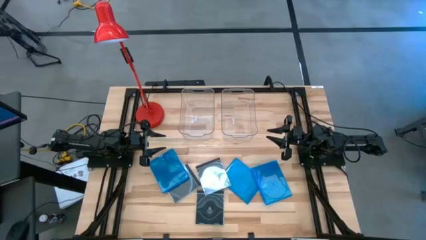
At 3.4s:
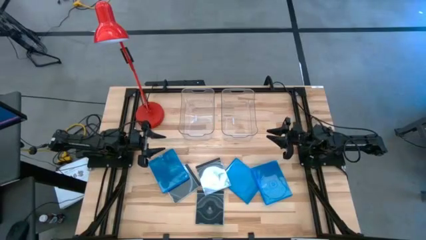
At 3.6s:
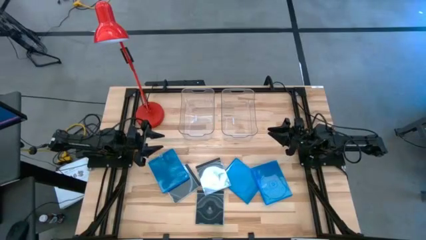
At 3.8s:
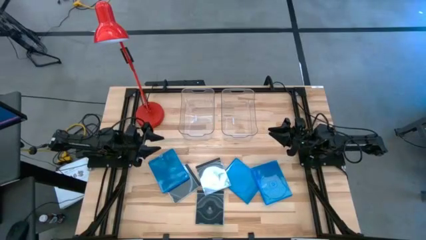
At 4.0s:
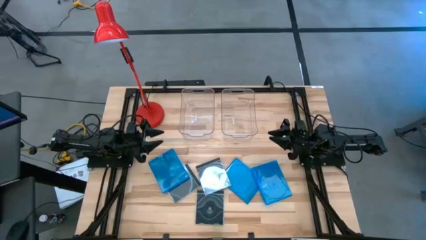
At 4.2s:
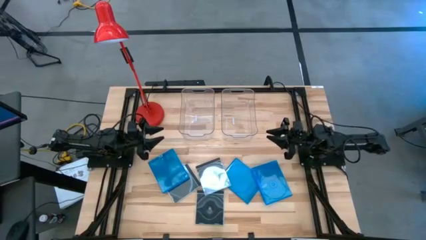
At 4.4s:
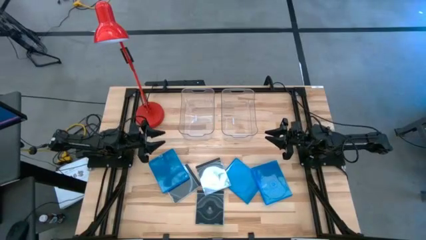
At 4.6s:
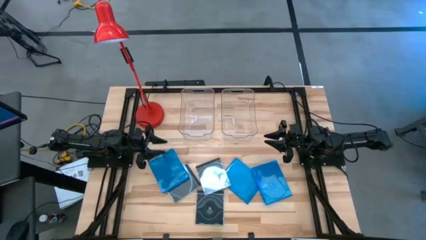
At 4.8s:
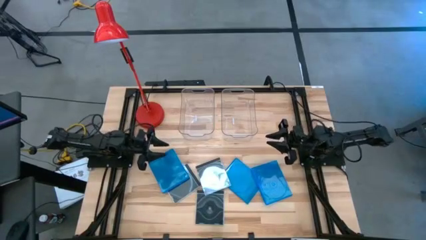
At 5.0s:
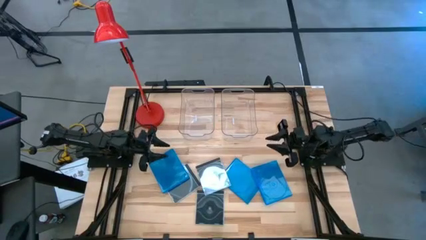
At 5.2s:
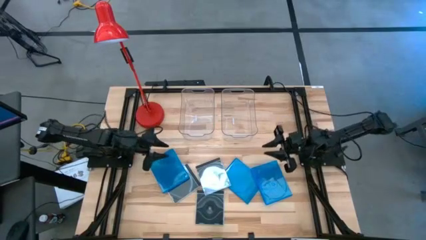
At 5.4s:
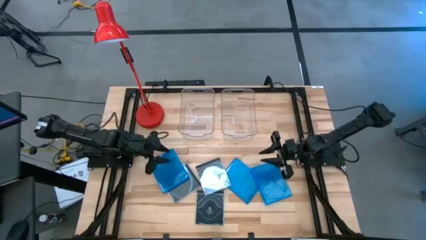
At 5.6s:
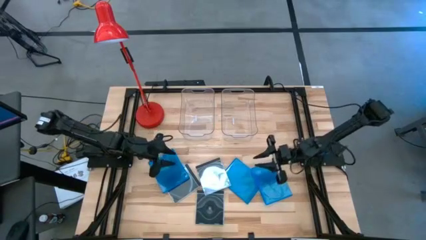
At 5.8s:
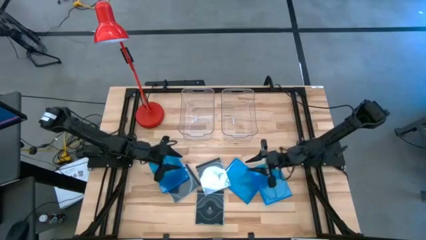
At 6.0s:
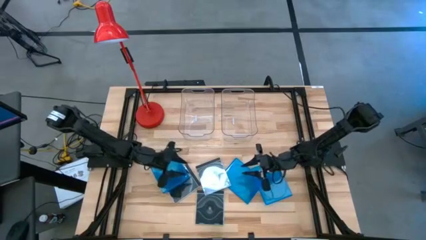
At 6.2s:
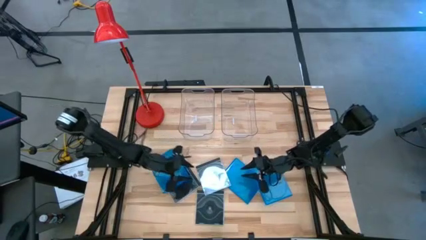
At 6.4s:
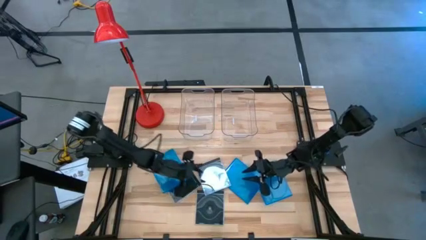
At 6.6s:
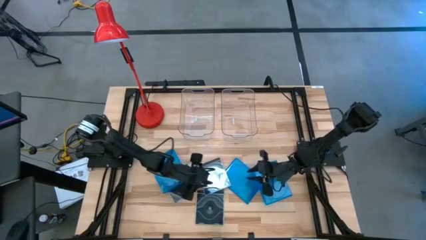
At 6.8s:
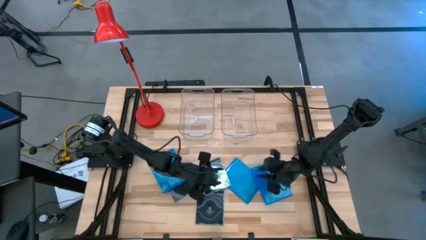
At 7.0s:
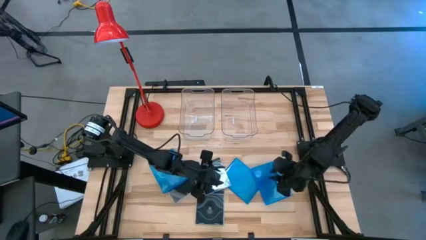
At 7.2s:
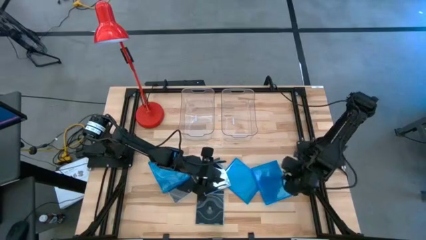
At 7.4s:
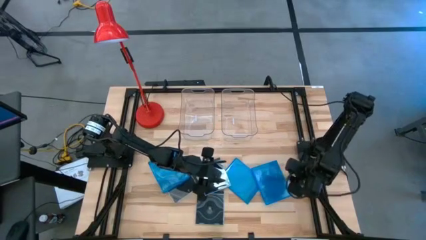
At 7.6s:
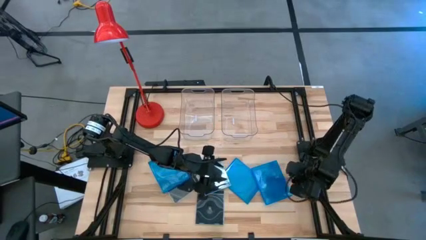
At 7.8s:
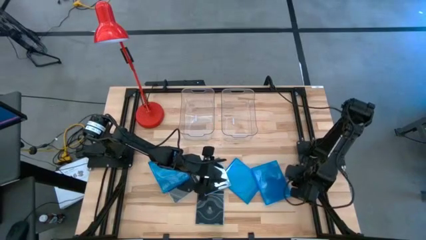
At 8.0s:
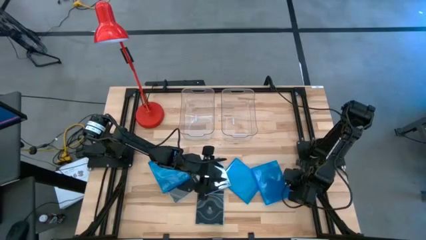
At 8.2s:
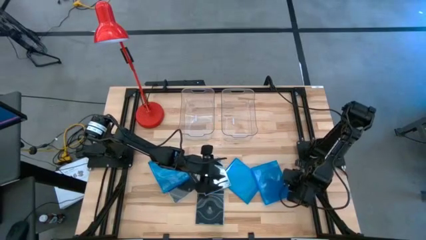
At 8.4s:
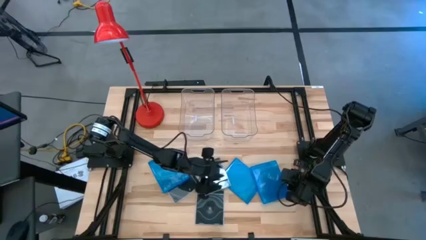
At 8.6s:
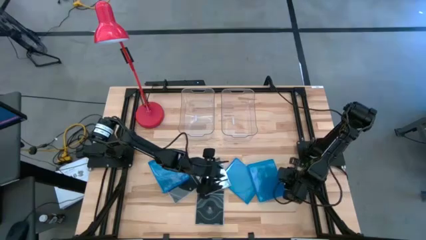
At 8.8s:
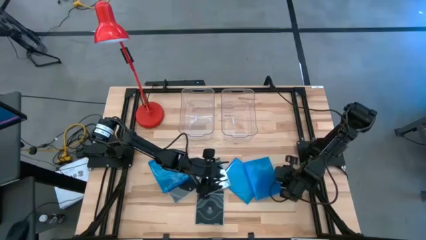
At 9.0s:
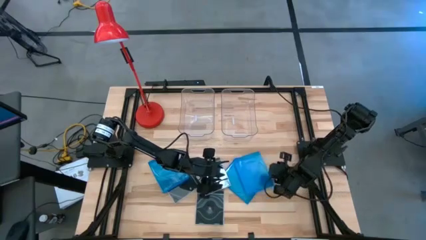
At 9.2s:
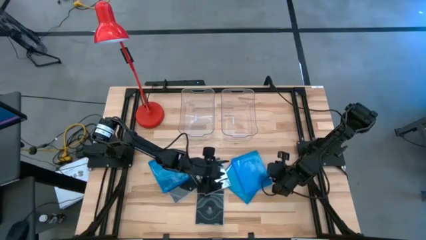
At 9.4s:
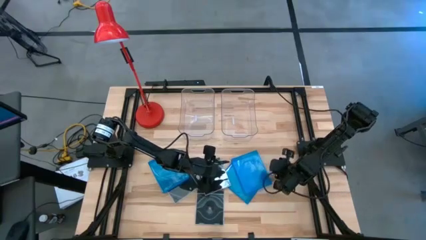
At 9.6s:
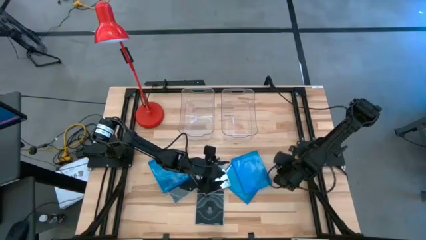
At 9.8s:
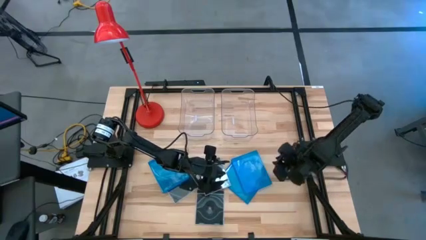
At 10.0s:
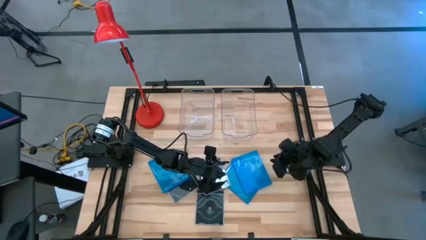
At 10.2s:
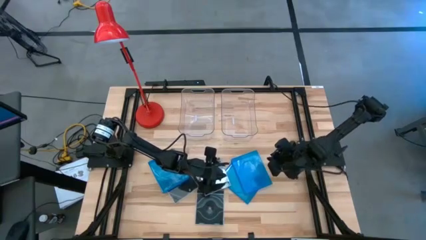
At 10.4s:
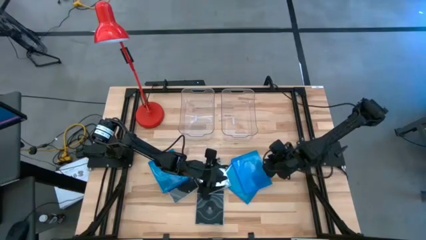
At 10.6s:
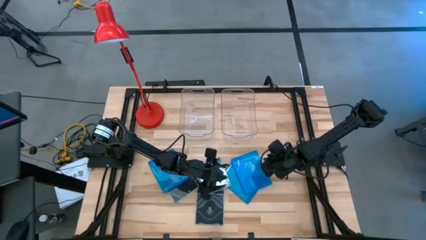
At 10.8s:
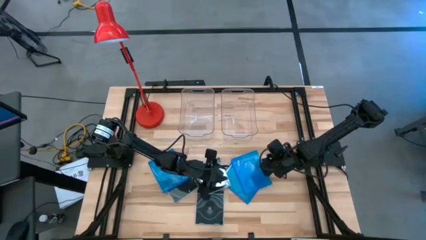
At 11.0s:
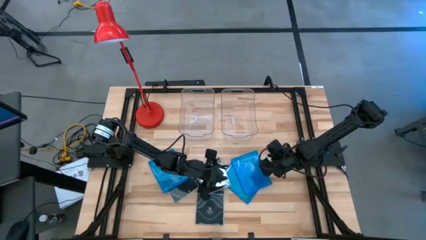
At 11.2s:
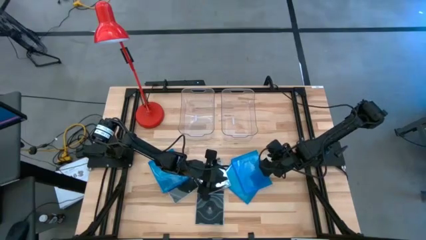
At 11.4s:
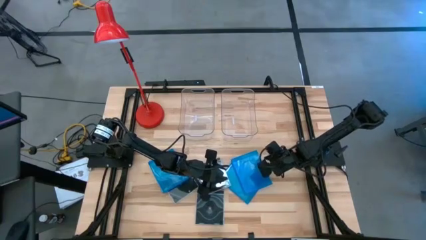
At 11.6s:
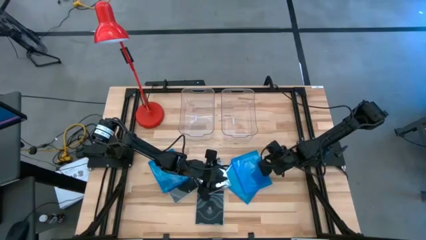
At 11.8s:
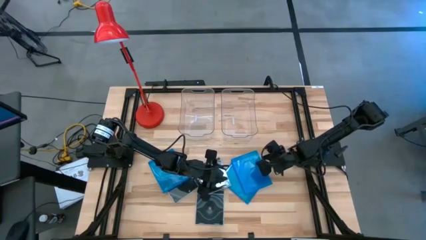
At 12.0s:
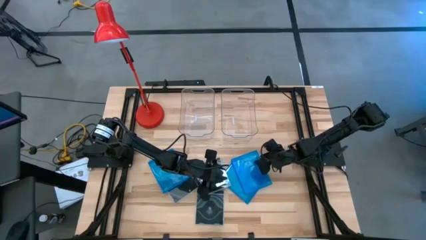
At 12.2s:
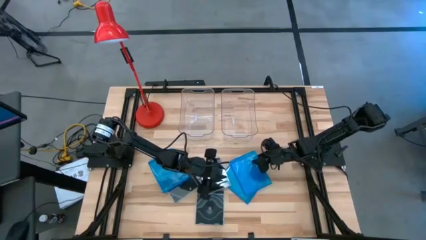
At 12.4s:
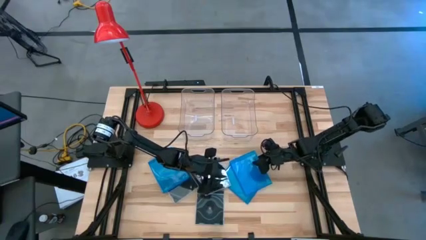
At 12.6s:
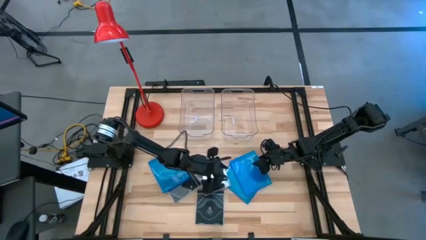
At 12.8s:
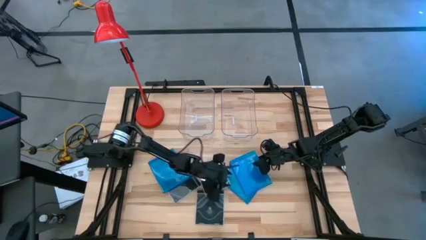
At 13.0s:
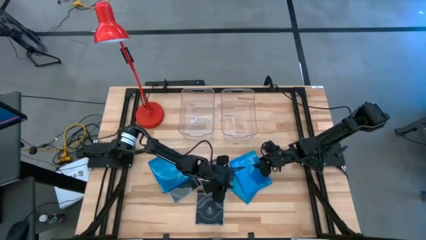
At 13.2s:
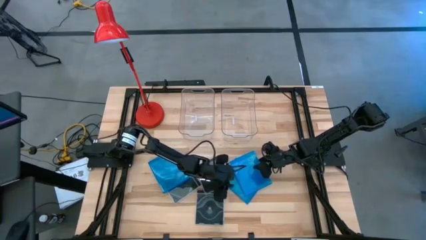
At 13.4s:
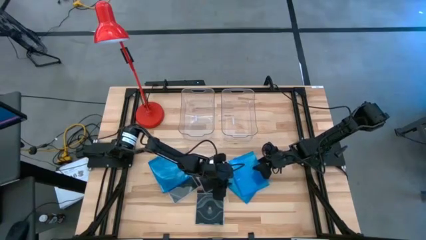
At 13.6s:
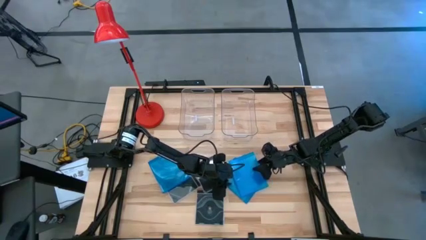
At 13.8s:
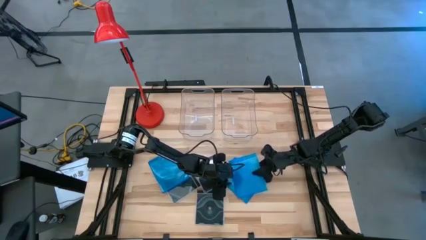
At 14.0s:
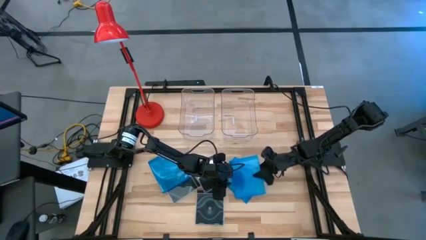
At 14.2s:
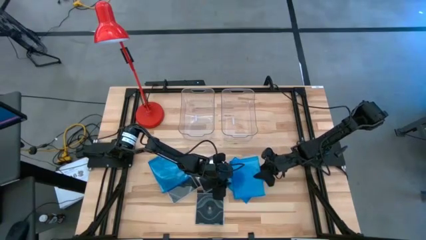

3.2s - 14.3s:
Task: Pick & place jewel cases by type
Put the right blue cd case into the right transparent bin

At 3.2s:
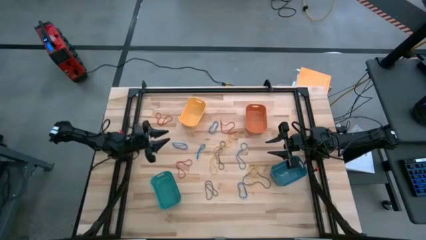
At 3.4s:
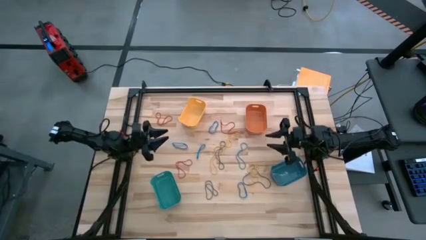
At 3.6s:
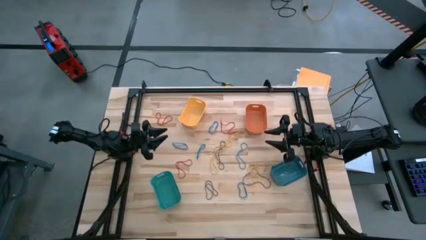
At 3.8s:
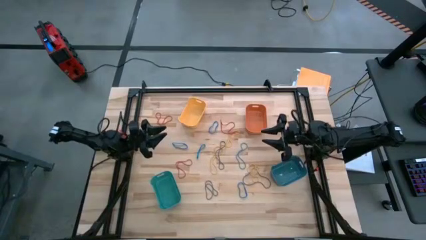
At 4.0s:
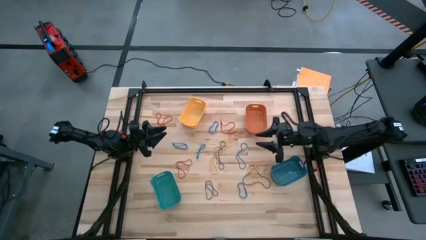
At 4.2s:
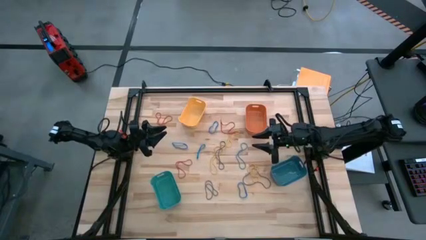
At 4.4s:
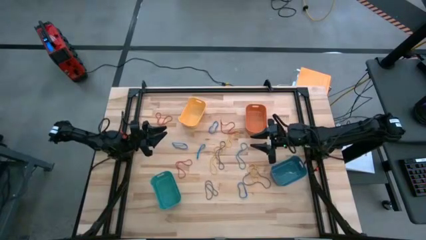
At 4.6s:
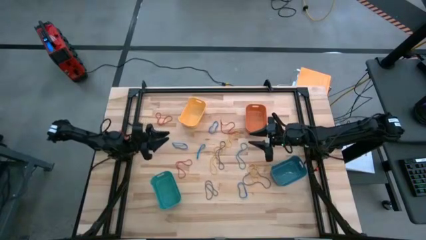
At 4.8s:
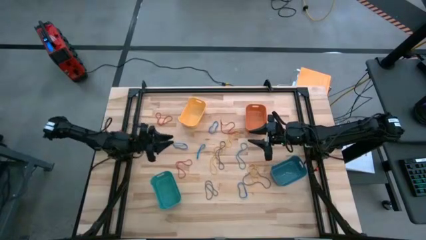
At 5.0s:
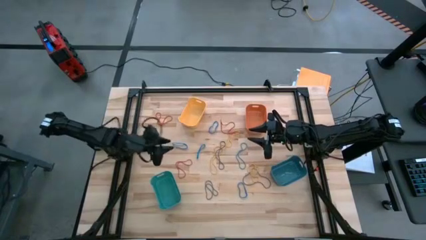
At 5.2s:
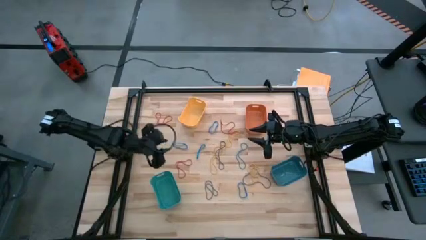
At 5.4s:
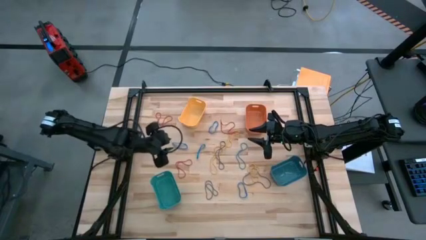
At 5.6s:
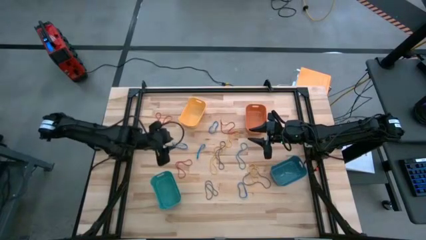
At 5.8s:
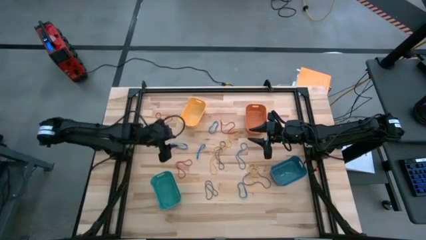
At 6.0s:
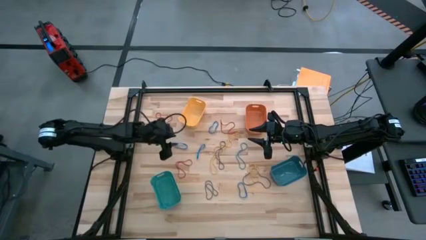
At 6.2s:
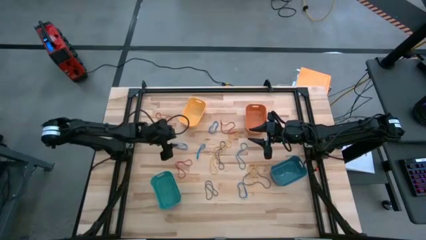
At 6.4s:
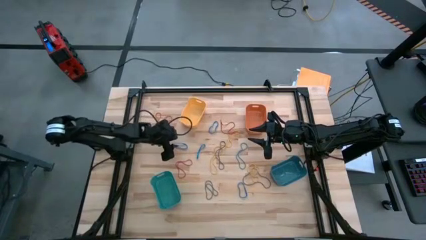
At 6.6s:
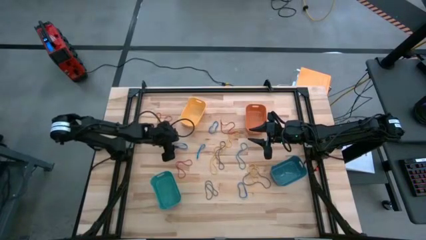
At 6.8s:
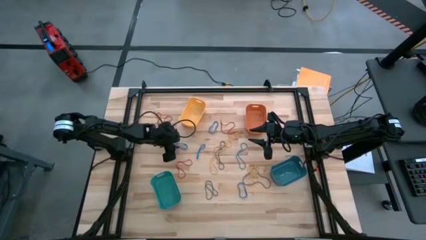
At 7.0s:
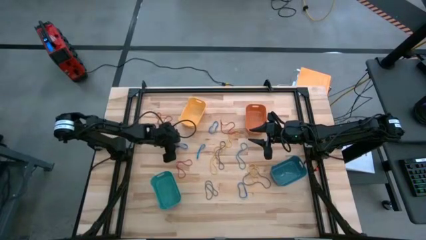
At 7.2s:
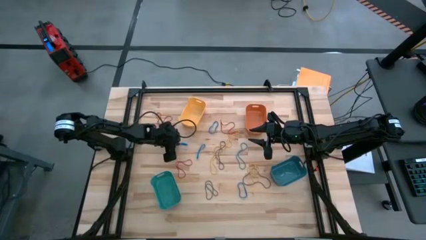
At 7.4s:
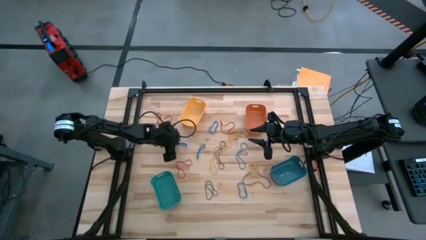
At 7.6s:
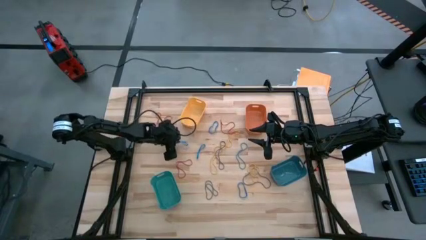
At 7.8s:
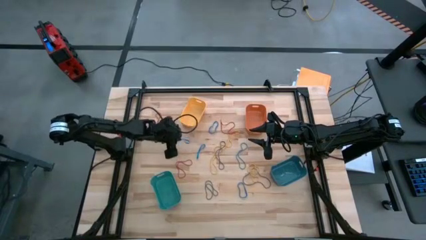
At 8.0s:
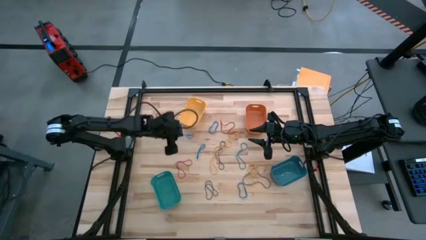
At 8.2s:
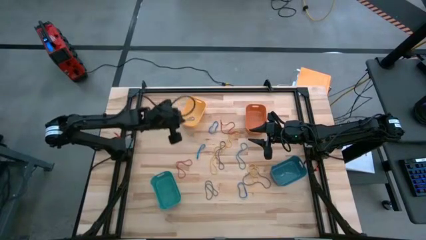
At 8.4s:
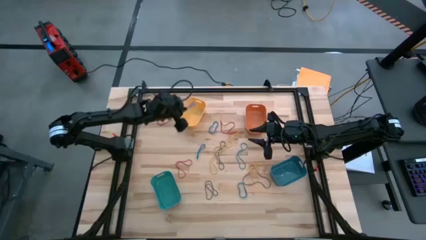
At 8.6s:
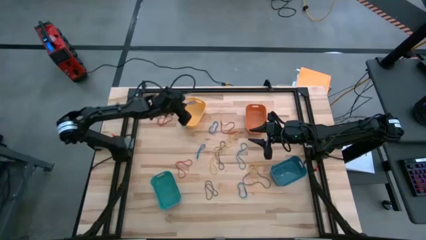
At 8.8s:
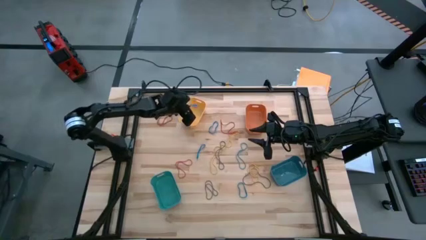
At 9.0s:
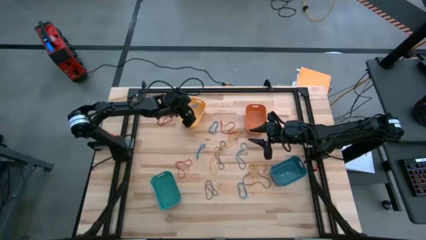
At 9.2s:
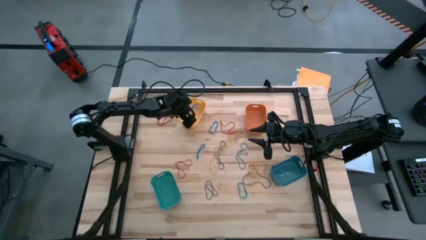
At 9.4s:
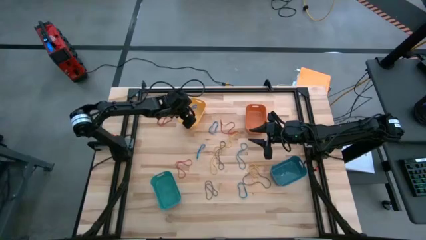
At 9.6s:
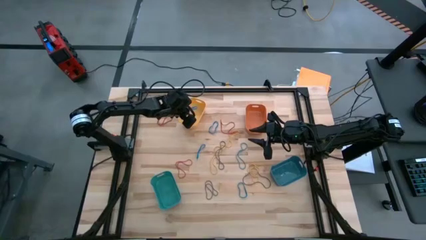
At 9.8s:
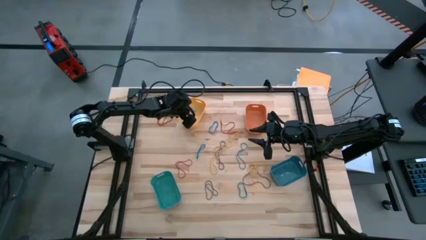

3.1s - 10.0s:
Task: Sort rubber bands into baskets
Put the blue rubber band into the yellow bin
